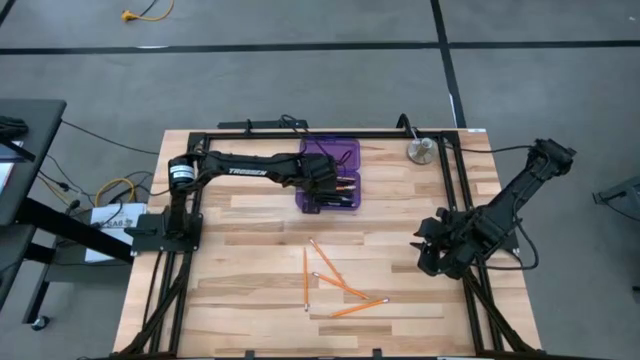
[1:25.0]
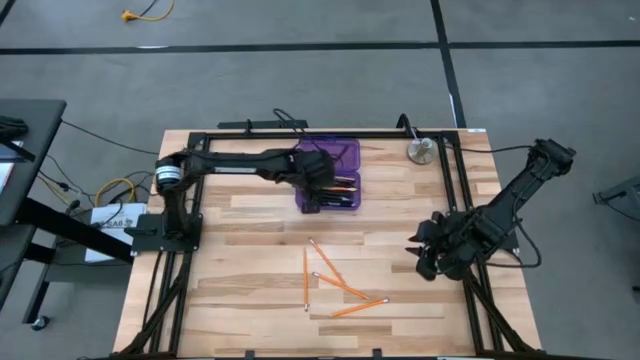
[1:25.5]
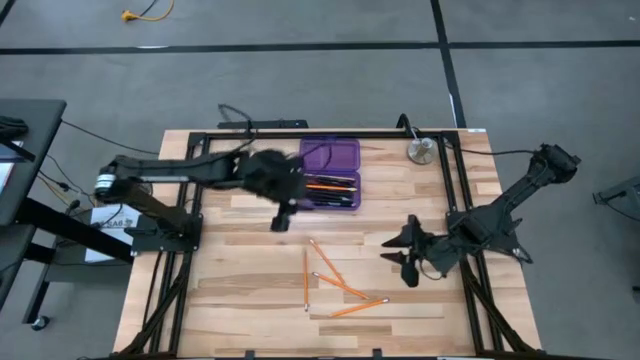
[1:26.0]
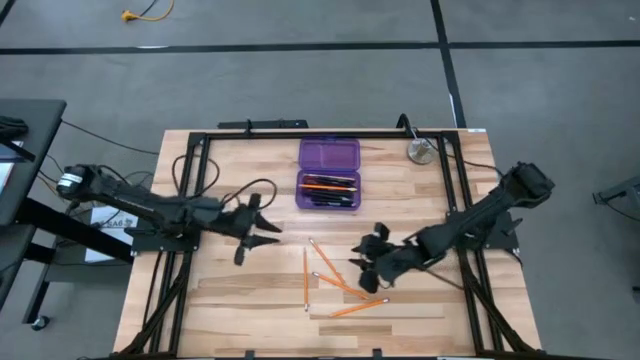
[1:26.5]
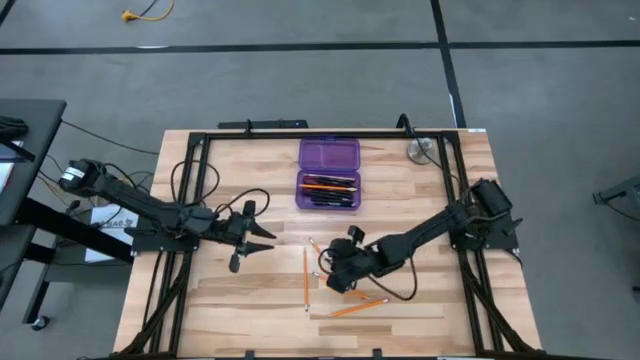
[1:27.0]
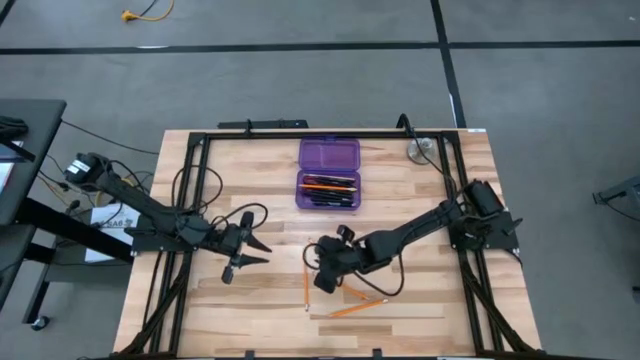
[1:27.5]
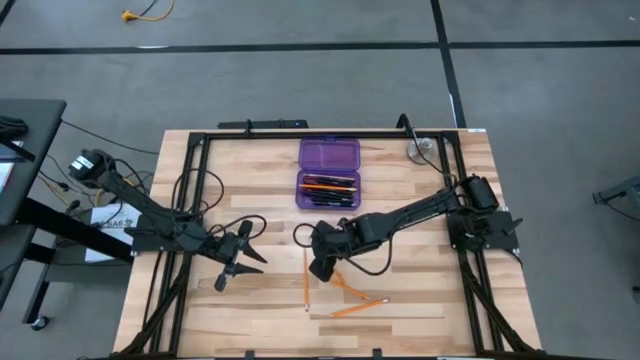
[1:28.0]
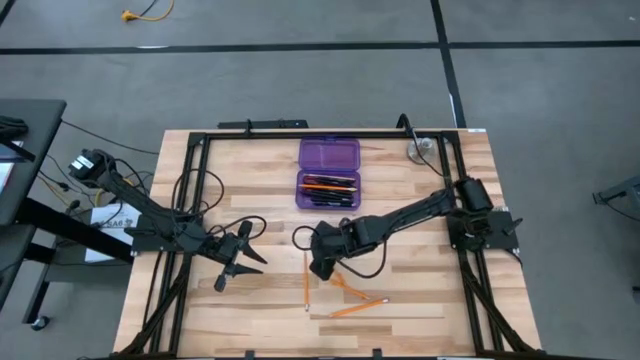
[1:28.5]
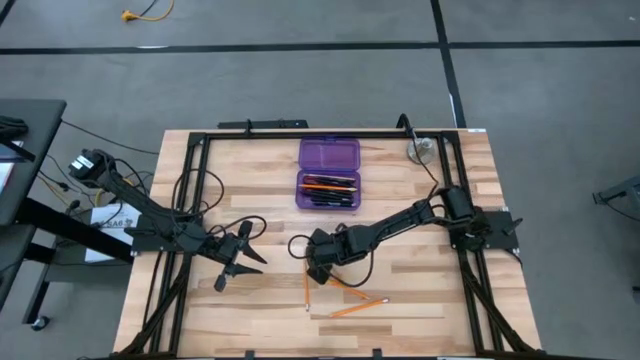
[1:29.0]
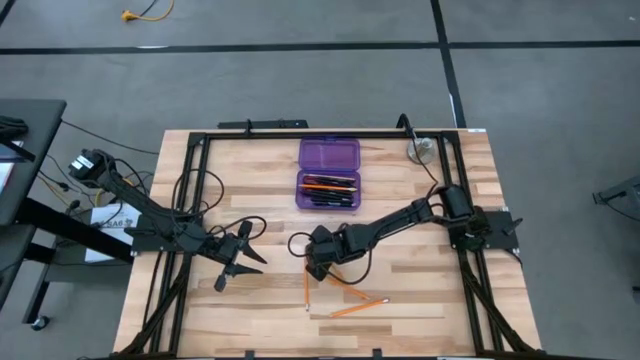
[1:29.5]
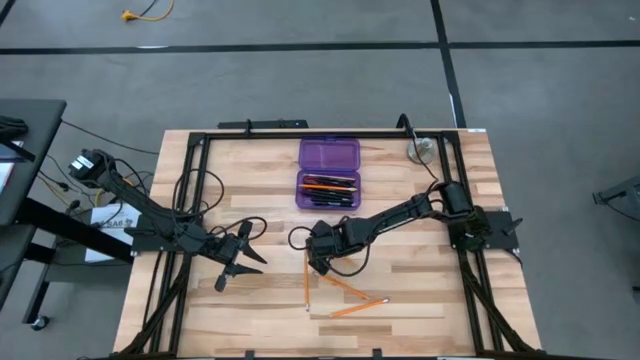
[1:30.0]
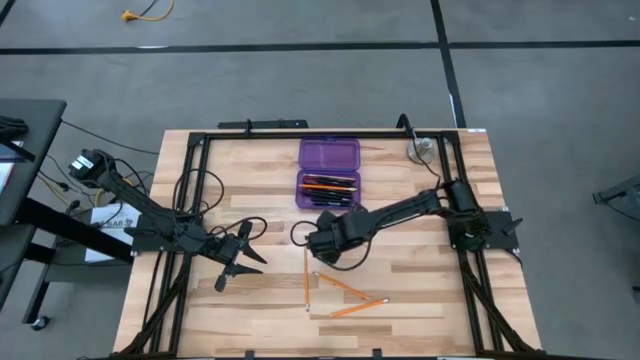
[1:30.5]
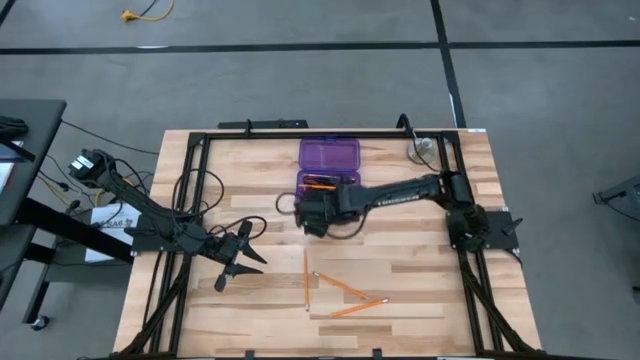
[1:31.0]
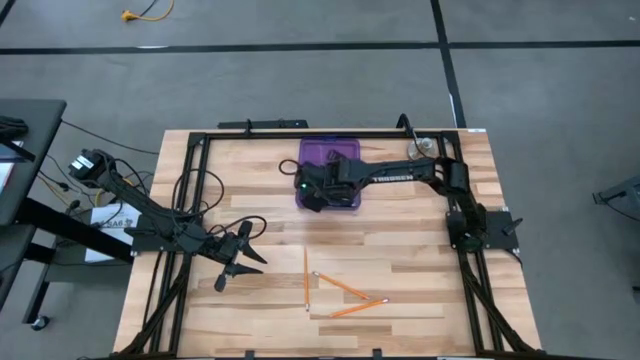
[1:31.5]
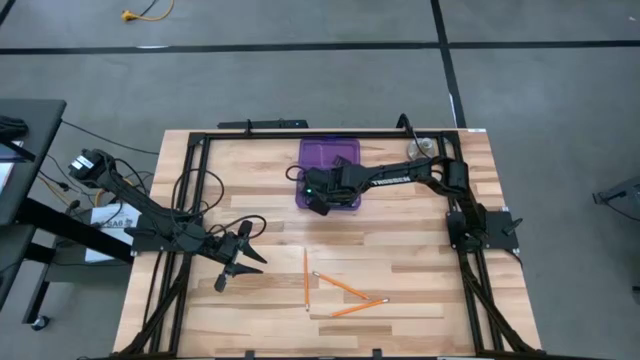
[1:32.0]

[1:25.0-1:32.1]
Task: Pick & place school supplies into a supply box
Put the orange pencil into the violet supply box

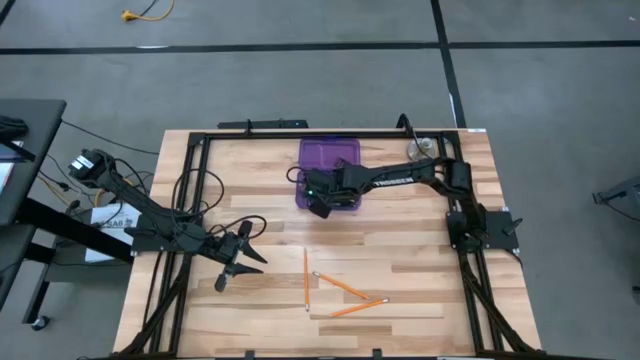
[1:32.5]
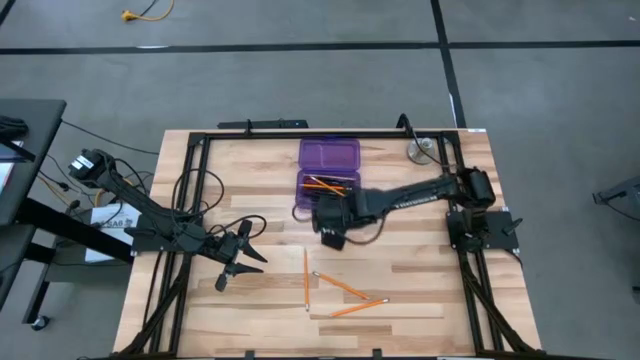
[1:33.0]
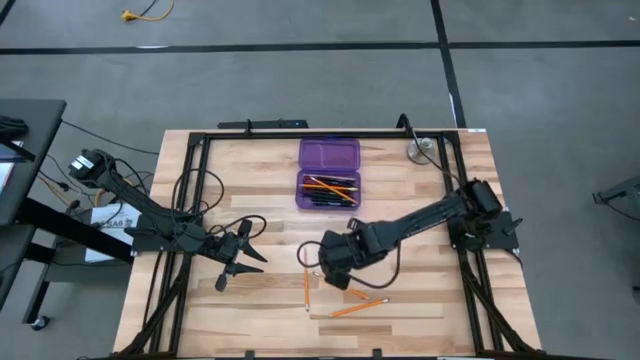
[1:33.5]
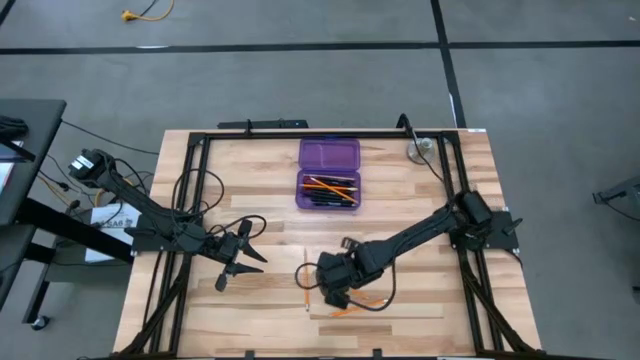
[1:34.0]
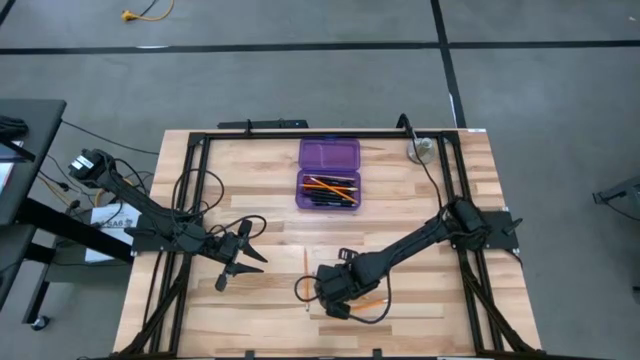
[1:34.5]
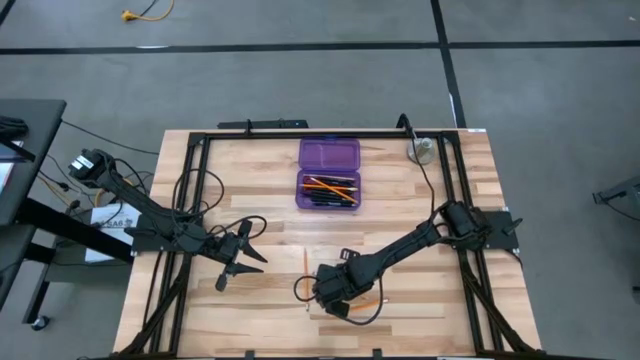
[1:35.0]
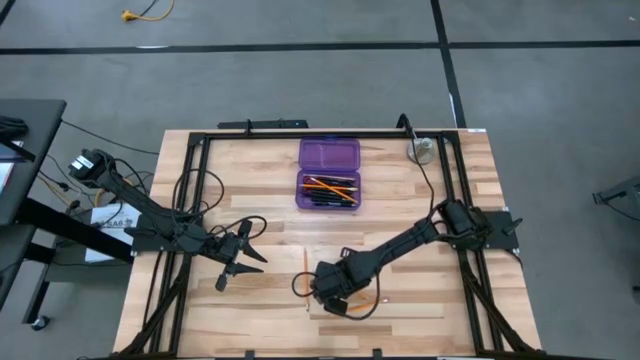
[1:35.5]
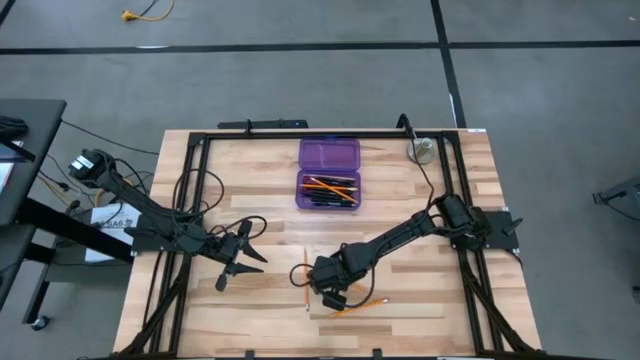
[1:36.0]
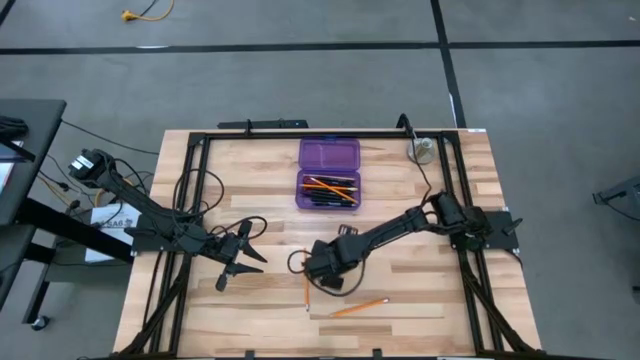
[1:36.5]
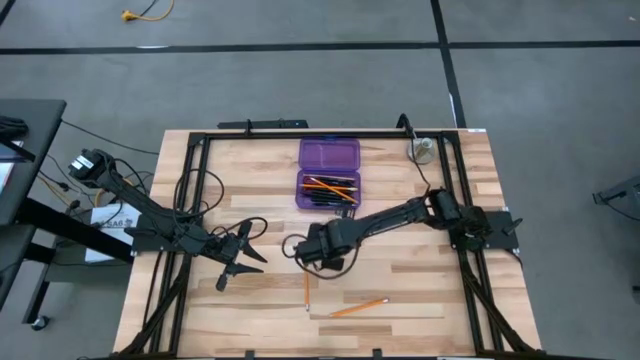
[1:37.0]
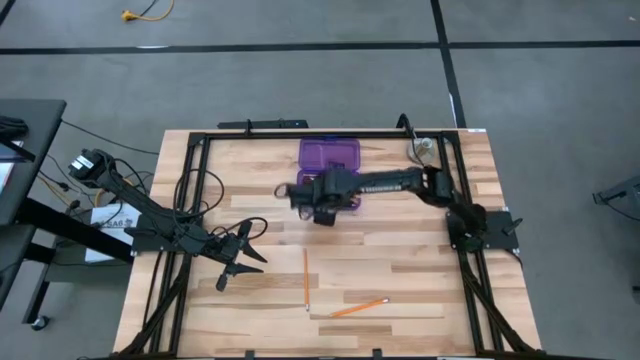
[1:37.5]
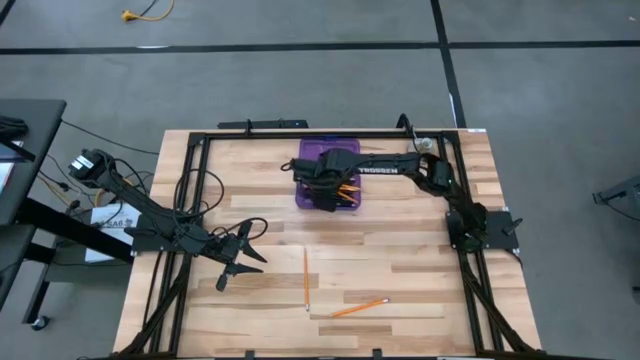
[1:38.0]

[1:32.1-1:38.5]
Put the orange pencil into the violet supply box

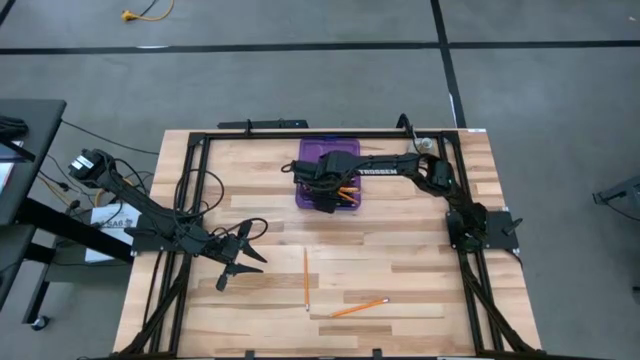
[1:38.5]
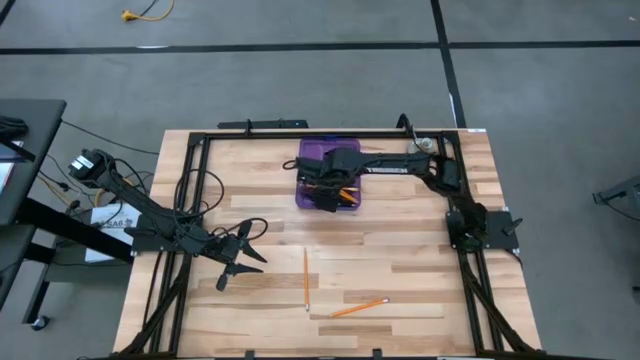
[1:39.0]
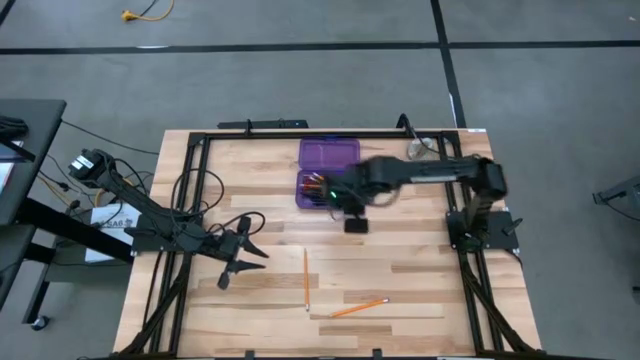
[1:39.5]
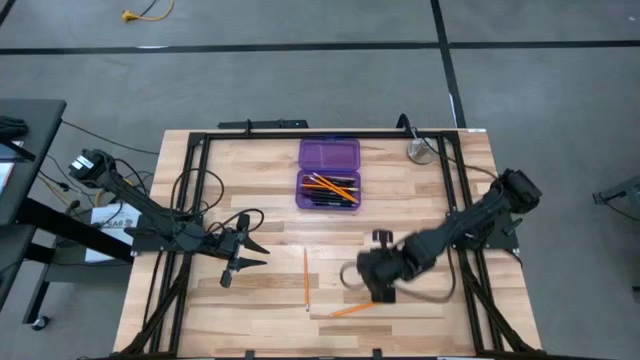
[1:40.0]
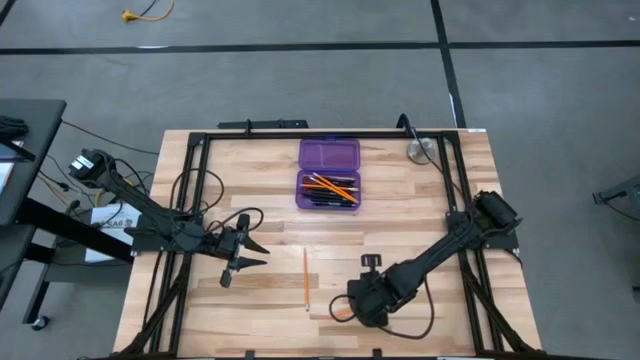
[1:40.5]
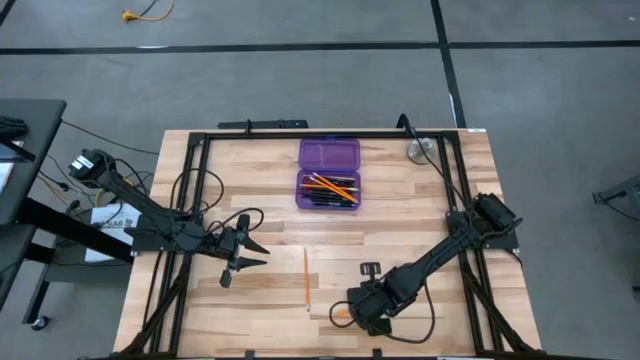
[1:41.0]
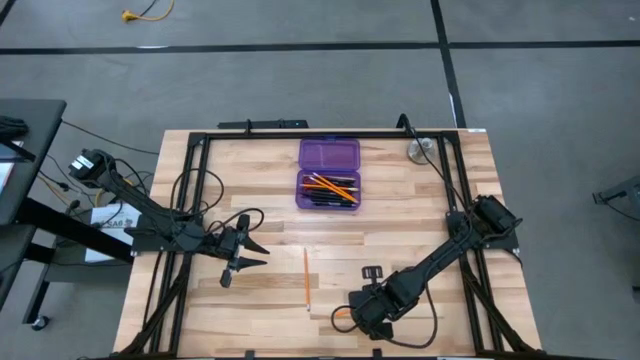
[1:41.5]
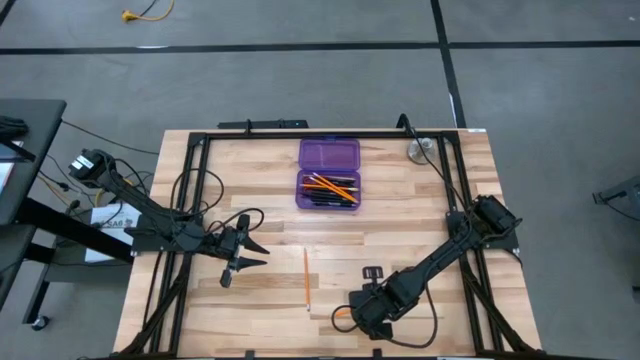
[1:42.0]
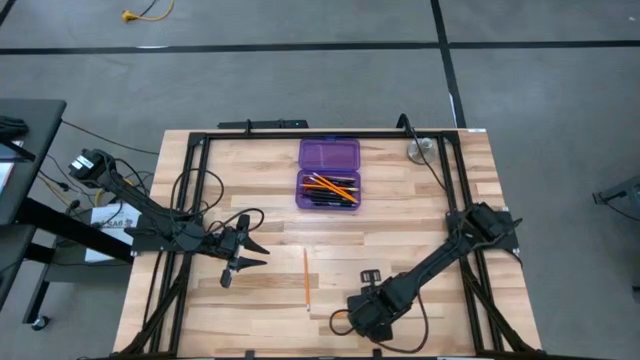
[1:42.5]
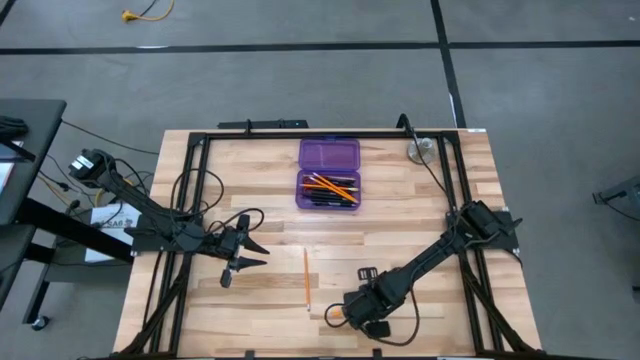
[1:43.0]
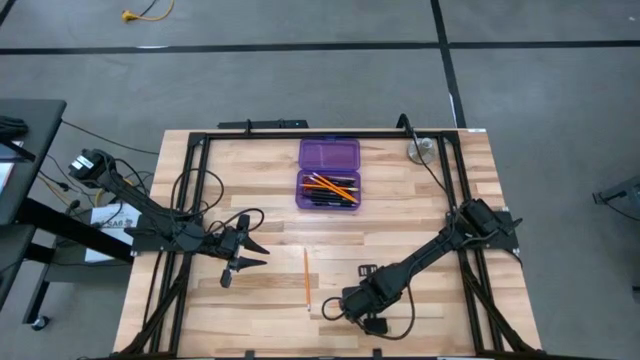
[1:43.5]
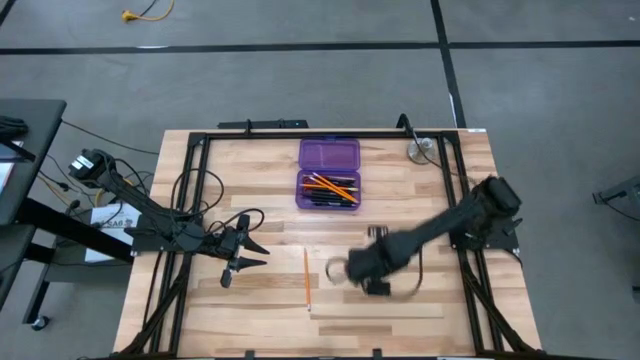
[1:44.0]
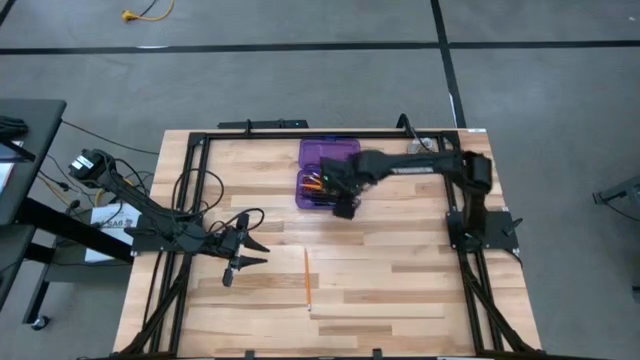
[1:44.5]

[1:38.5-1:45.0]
Put the orange pencil into the violet supply box
